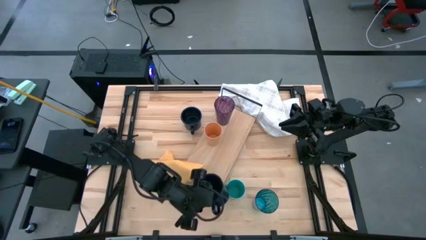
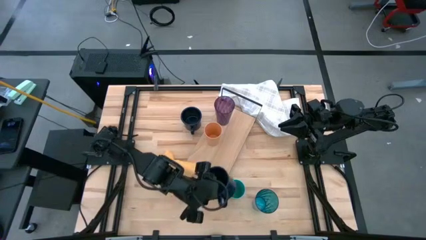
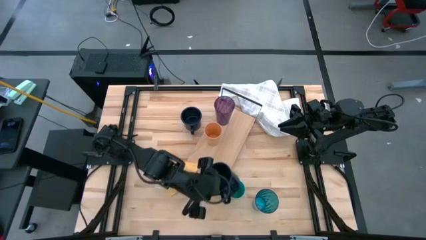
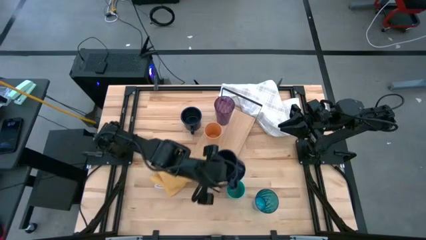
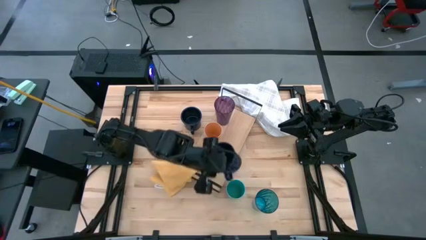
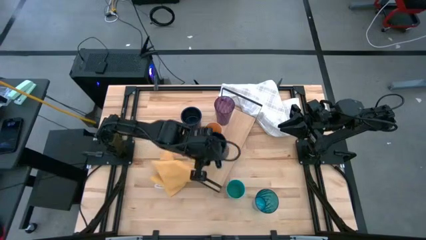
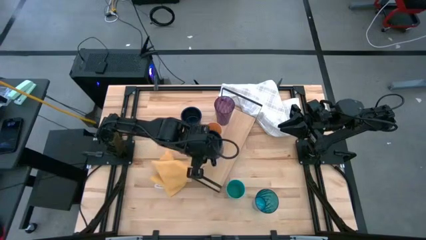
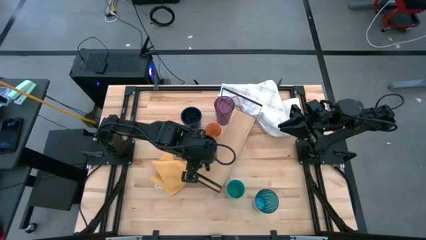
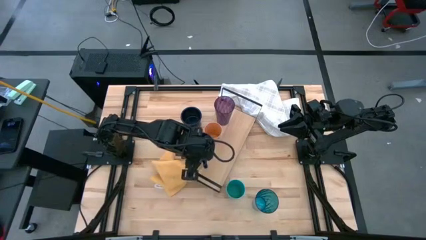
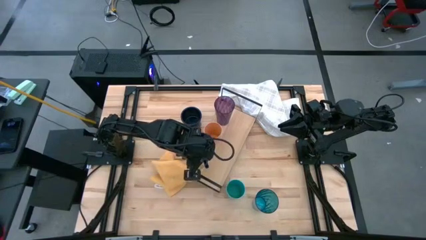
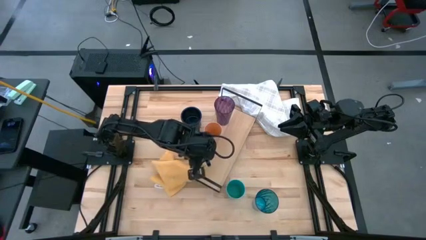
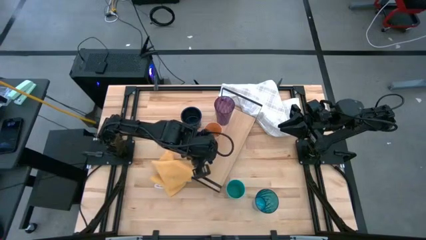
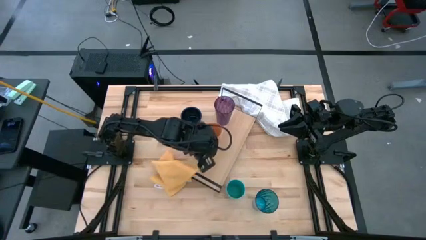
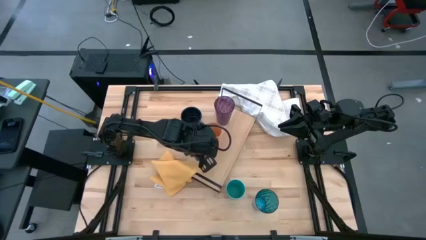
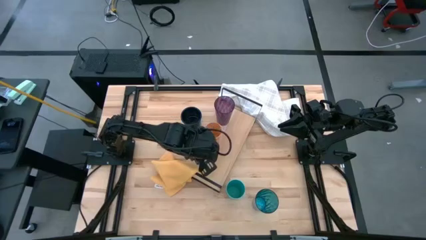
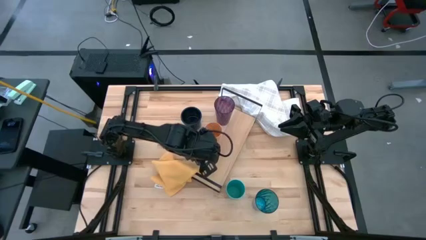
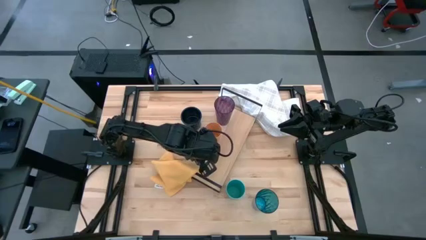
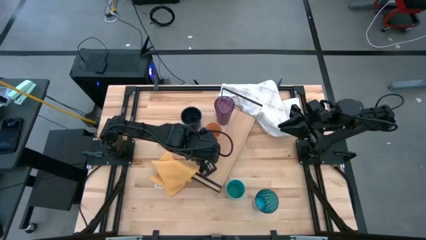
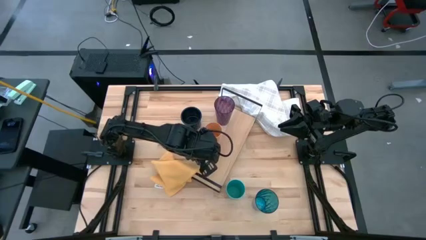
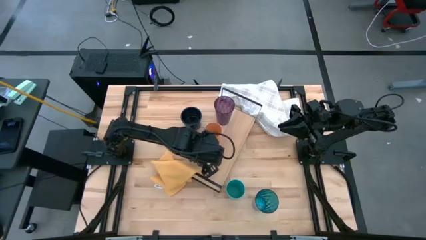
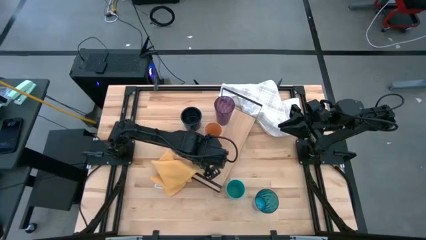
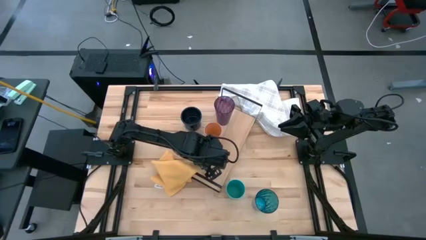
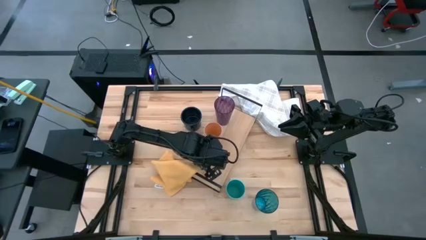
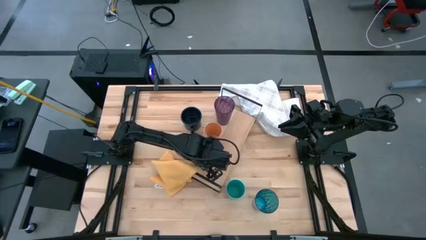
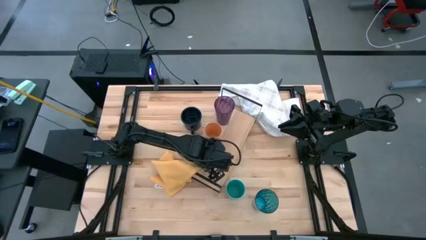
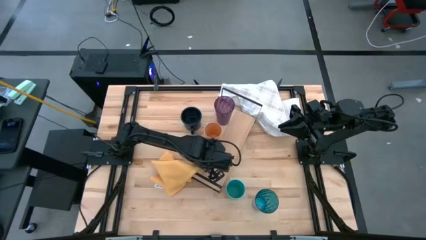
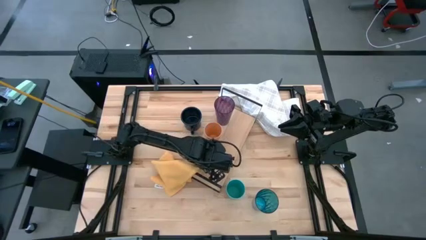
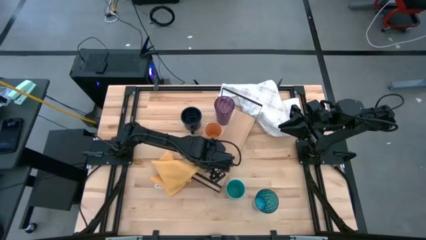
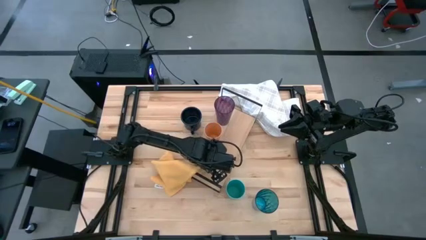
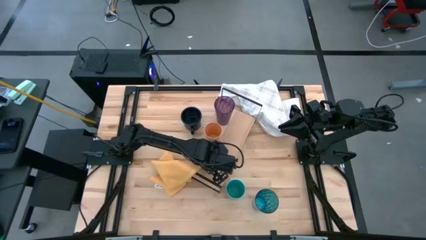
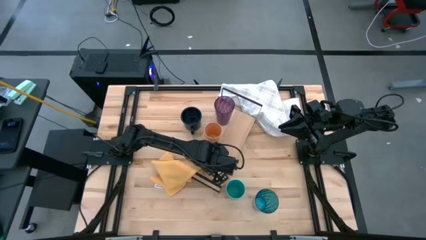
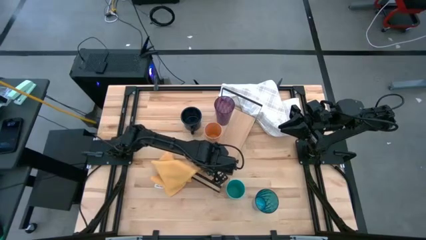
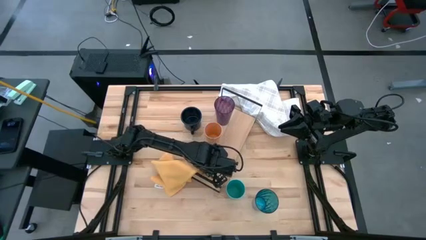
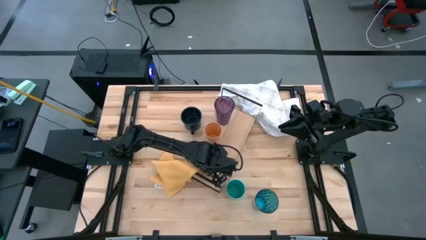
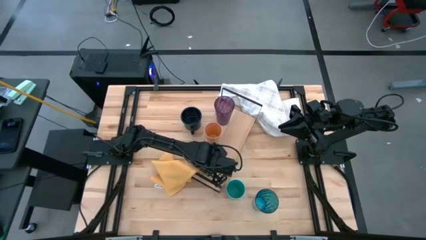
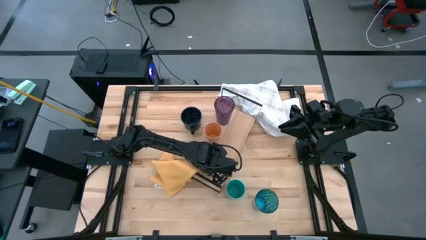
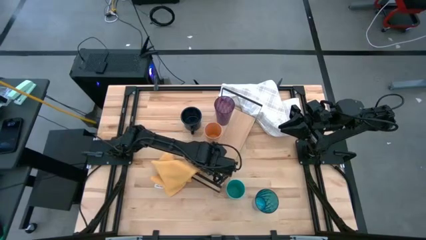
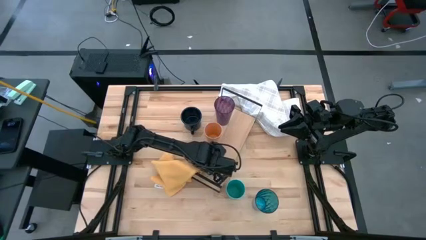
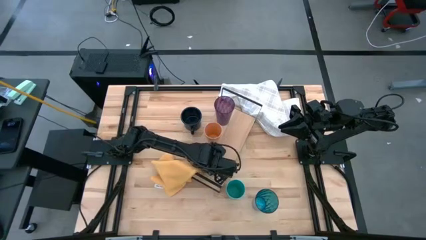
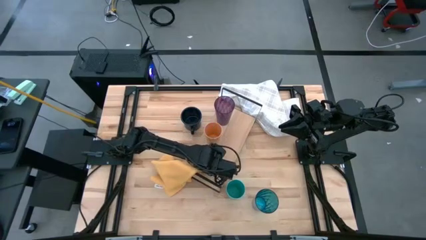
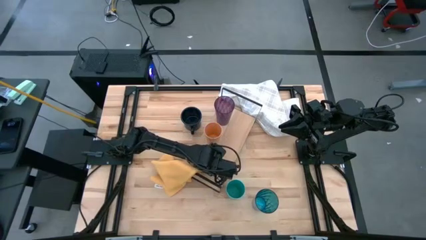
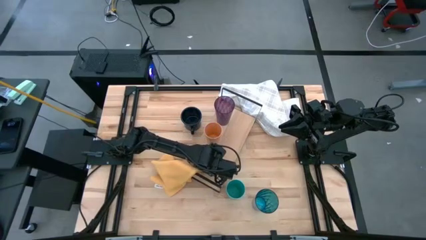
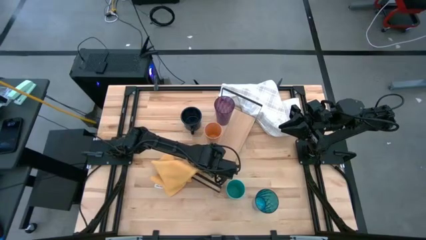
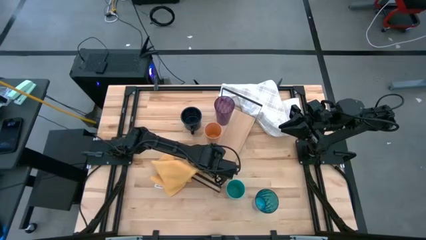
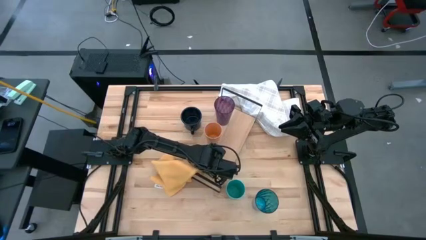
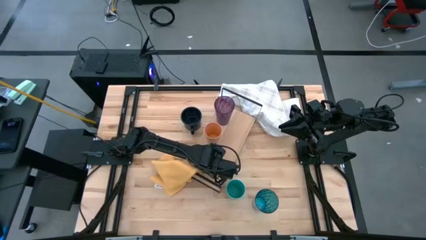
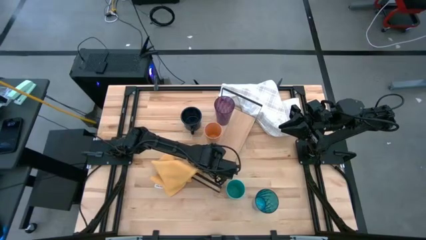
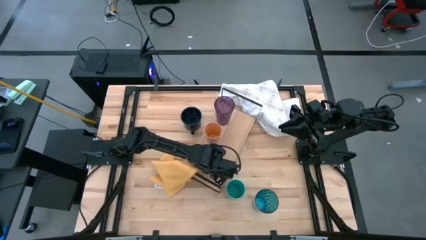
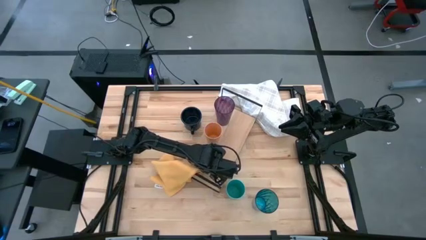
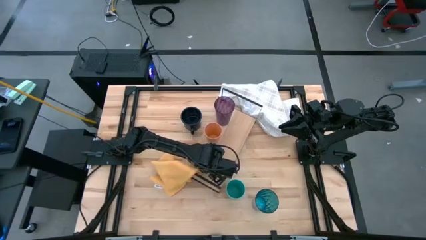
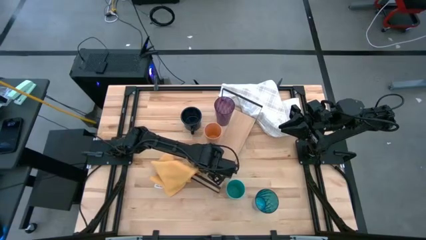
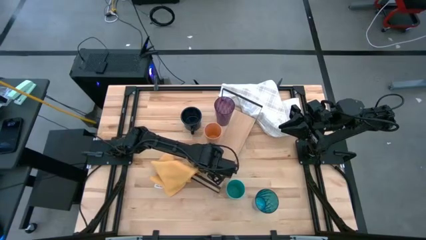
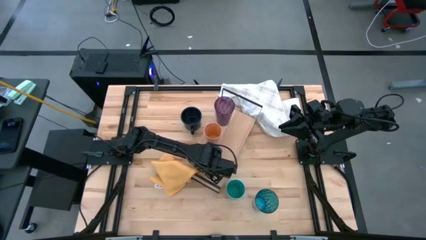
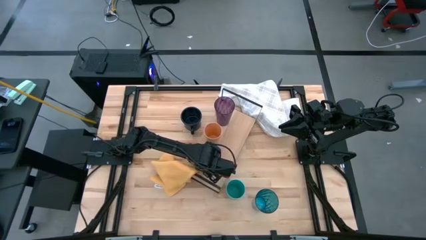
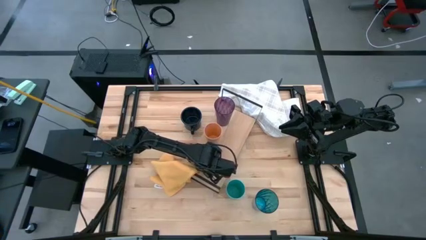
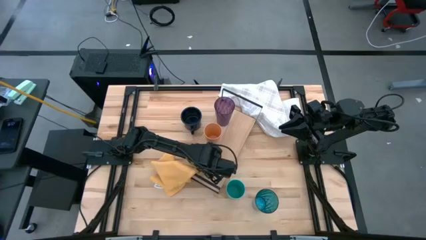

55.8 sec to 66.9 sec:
Task: Stack small to large cups/mugs on shelf
Put the bottom dark blue mug on the shelf
